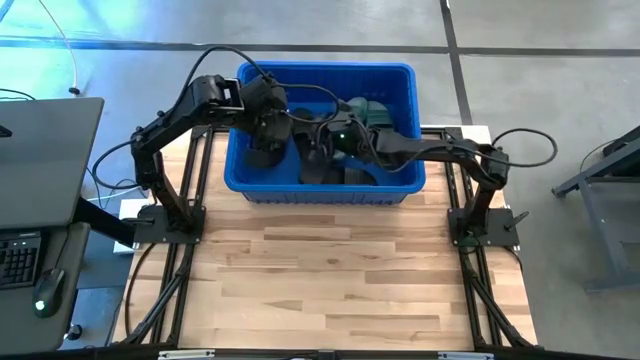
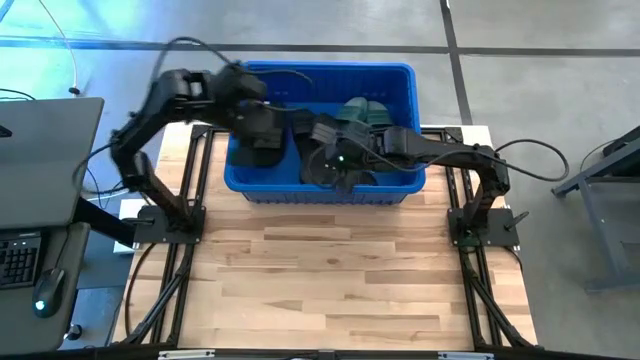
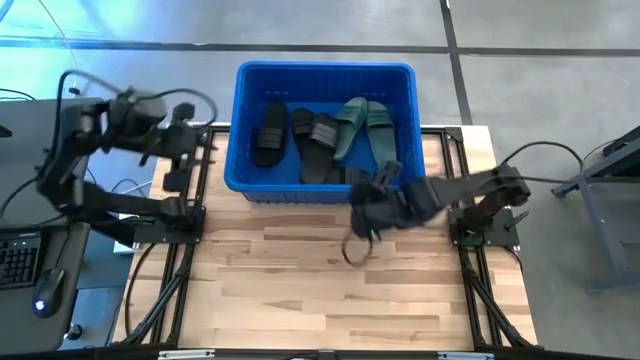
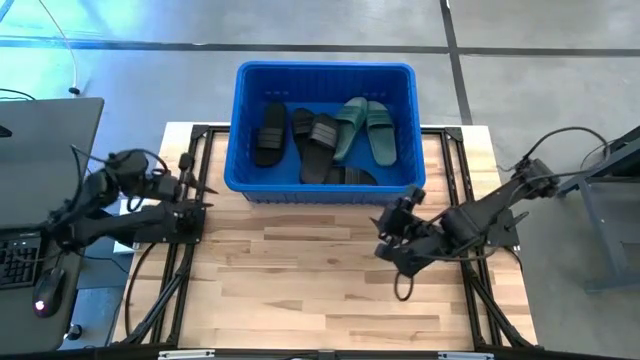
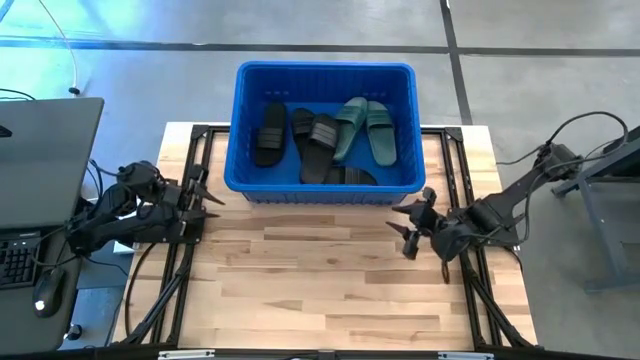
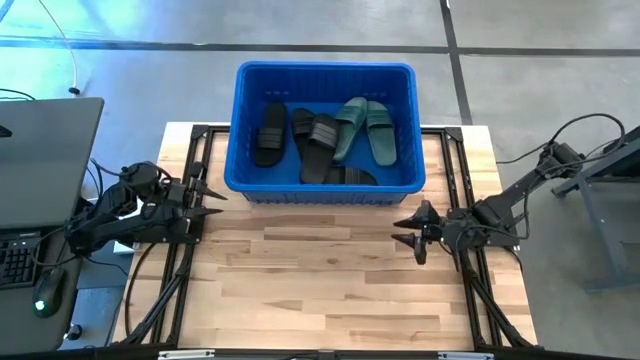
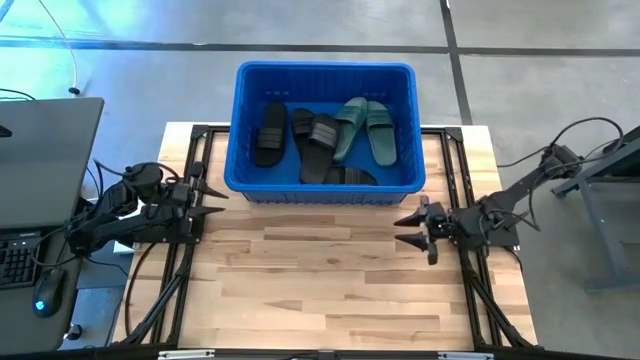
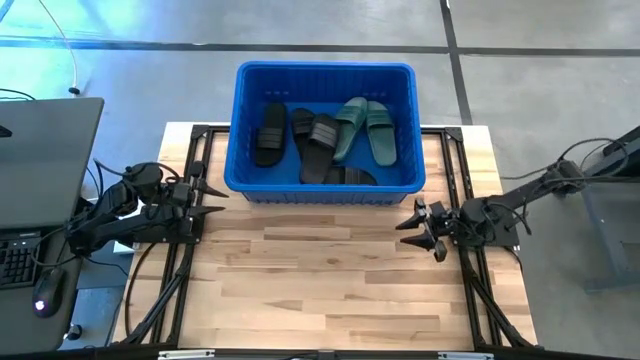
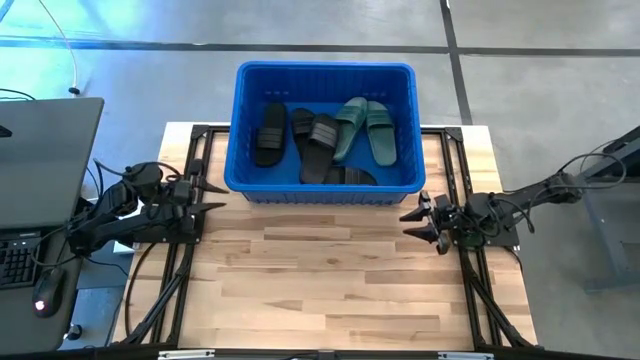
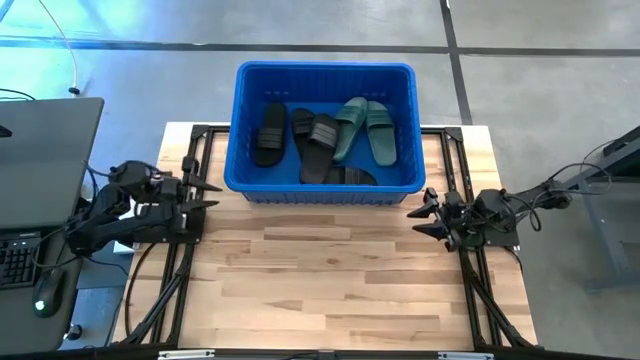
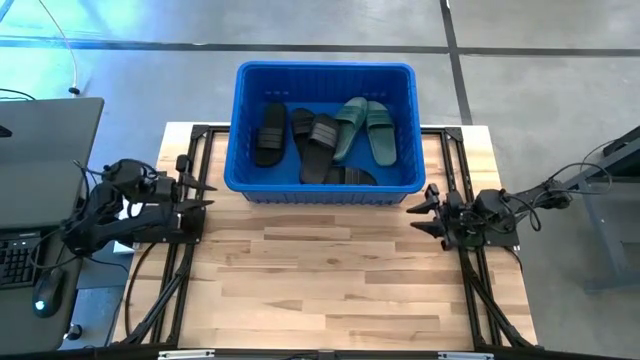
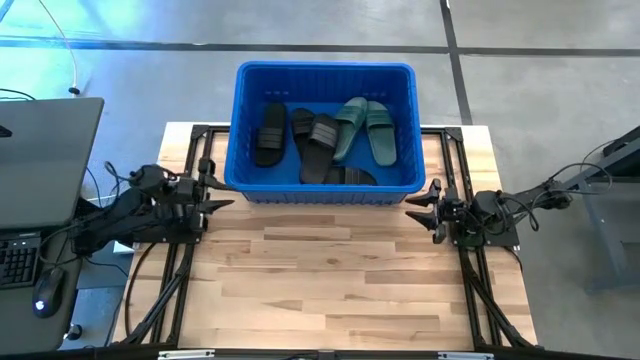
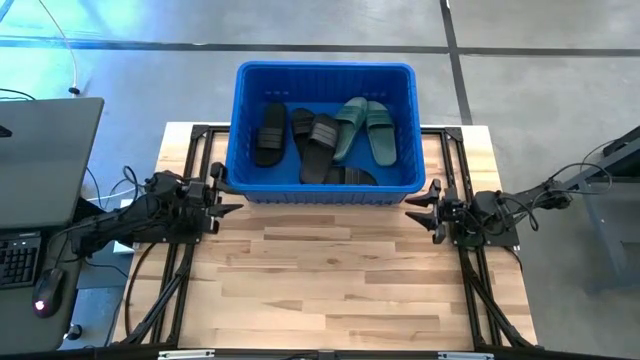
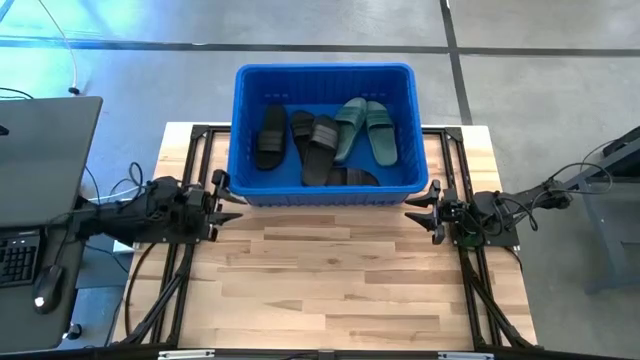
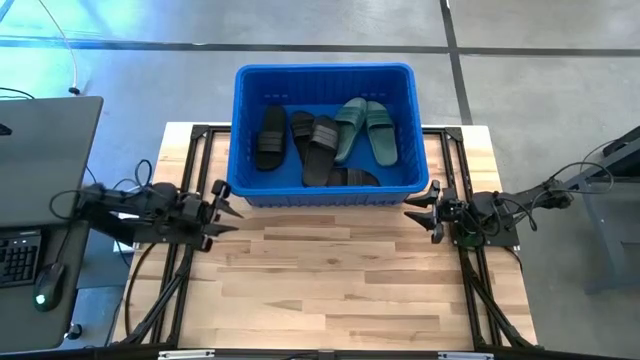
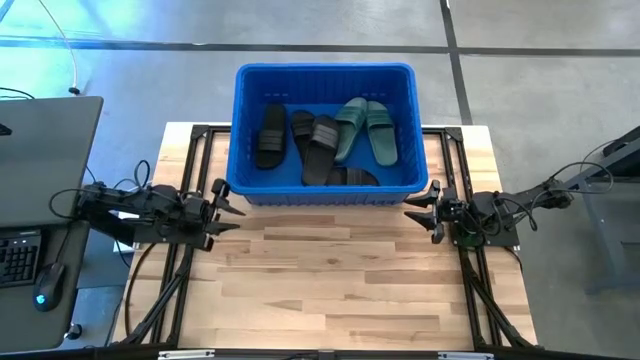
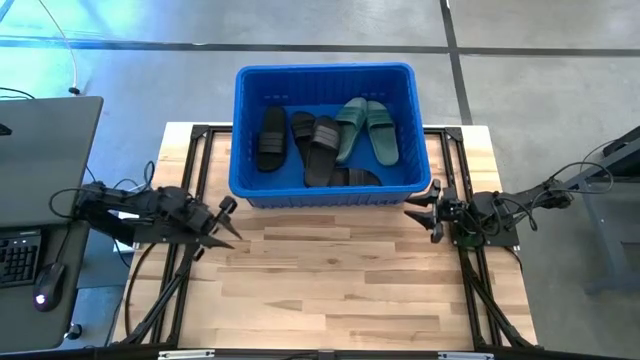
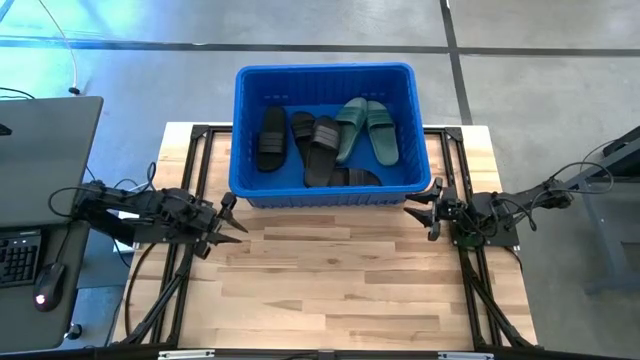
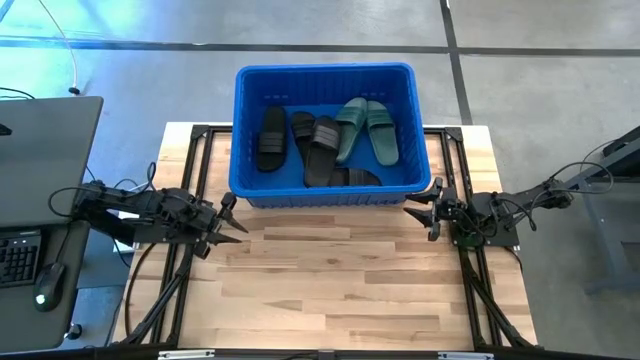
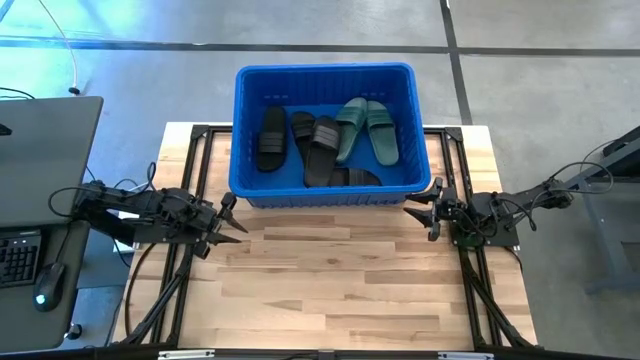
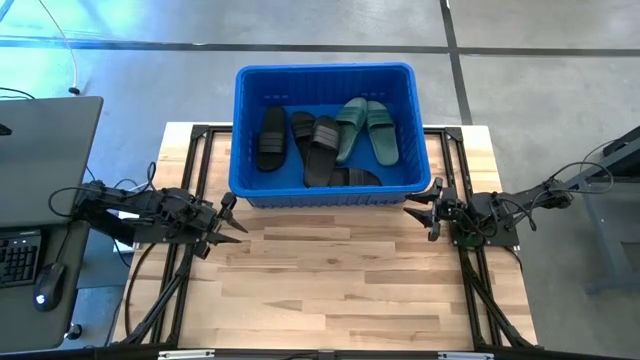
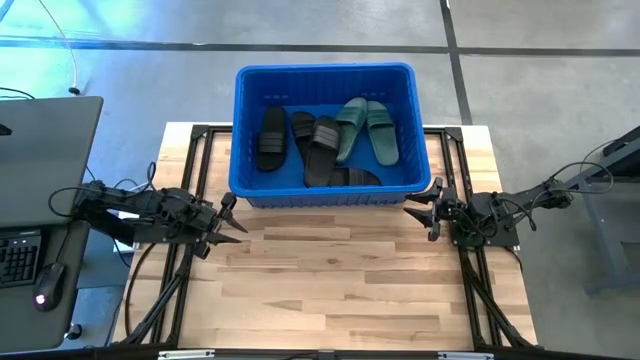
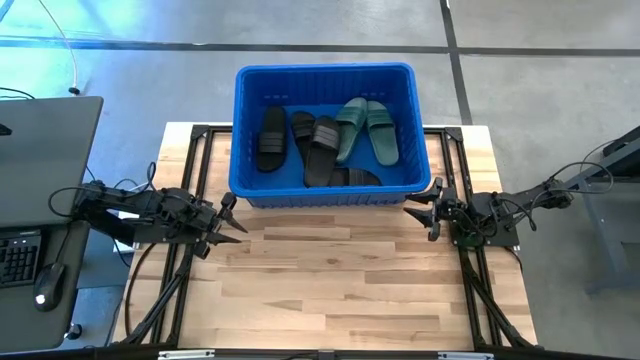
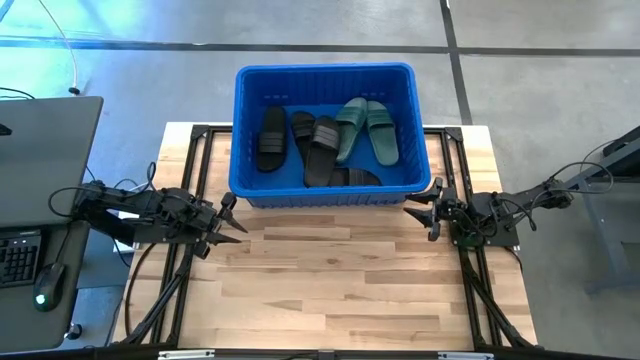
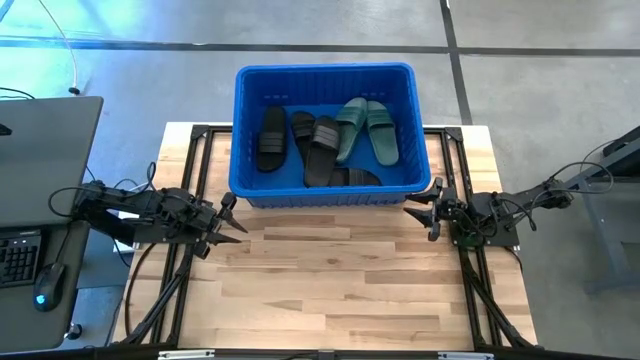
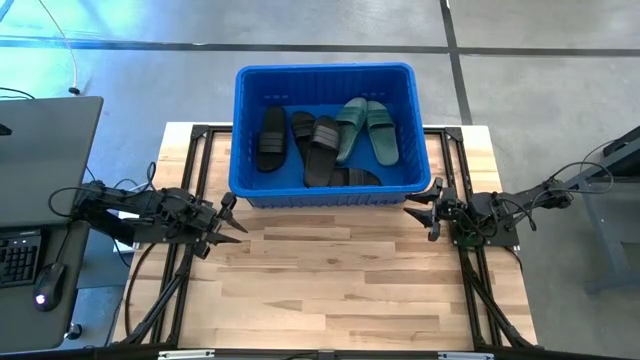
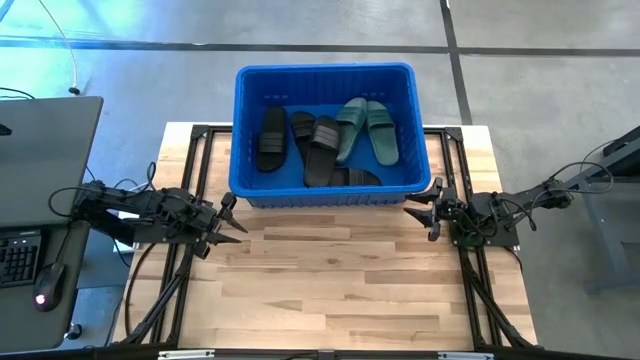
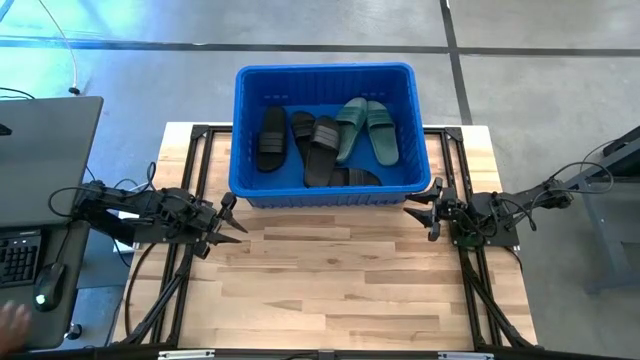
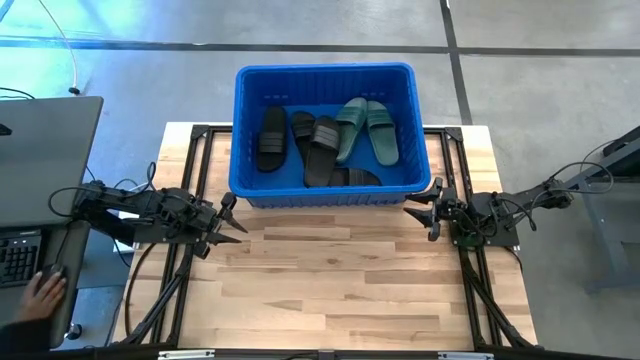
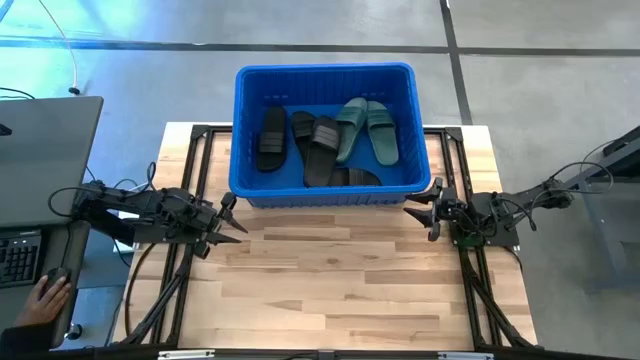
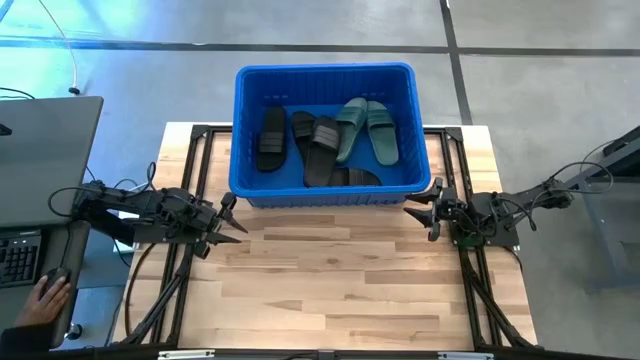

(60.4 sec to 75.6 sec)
Task: Pick and place slides into bin
Return to Home Position

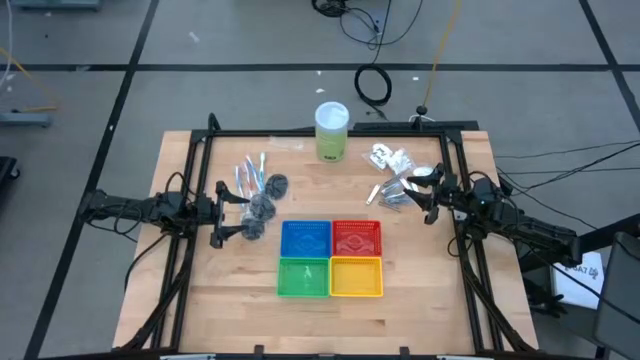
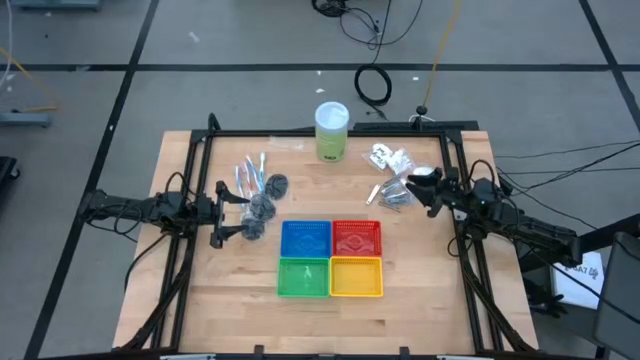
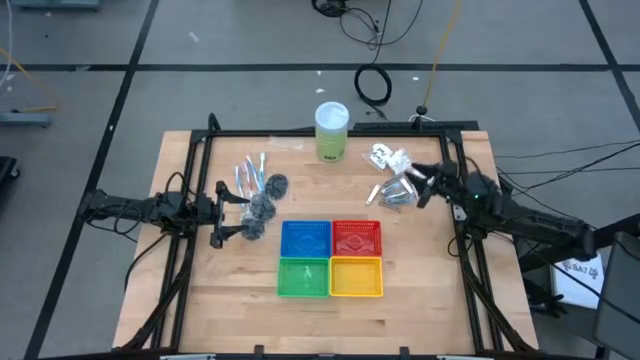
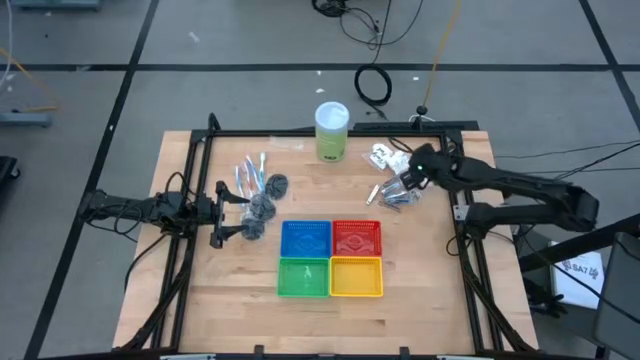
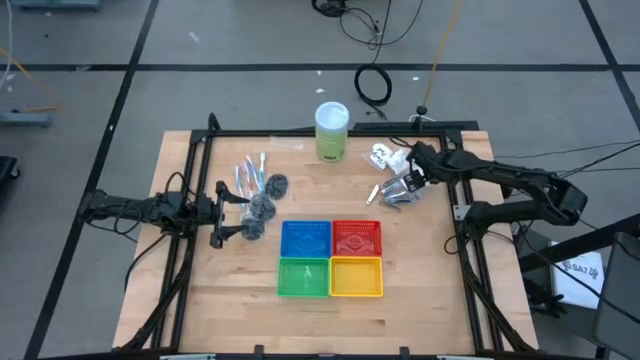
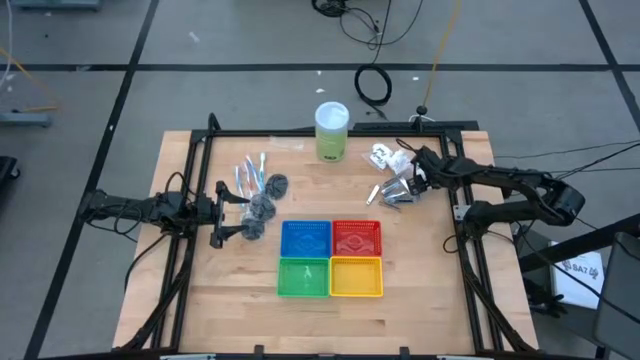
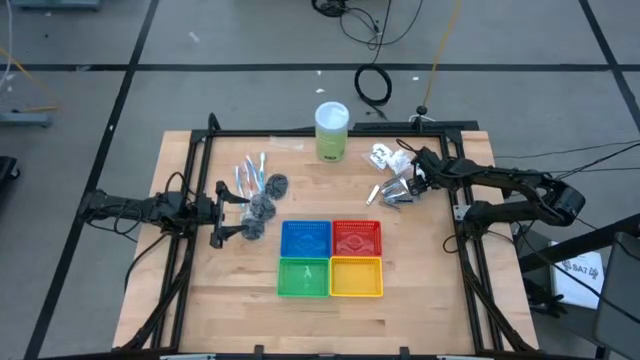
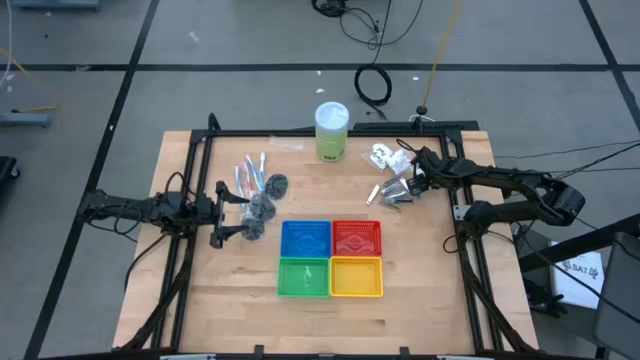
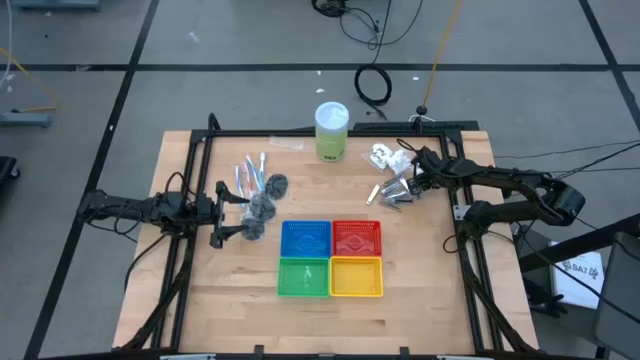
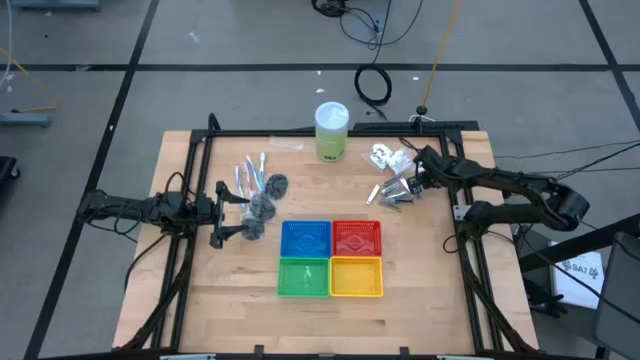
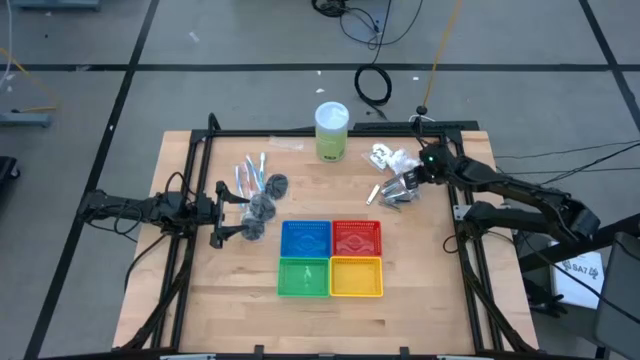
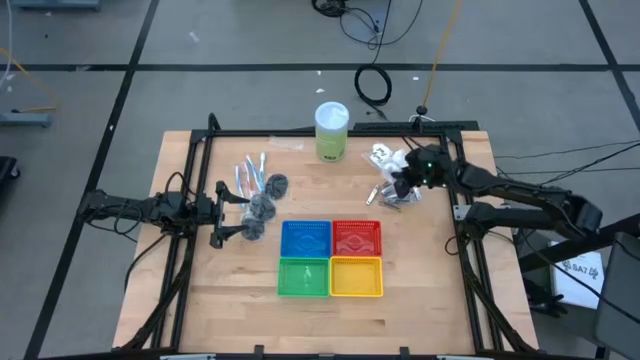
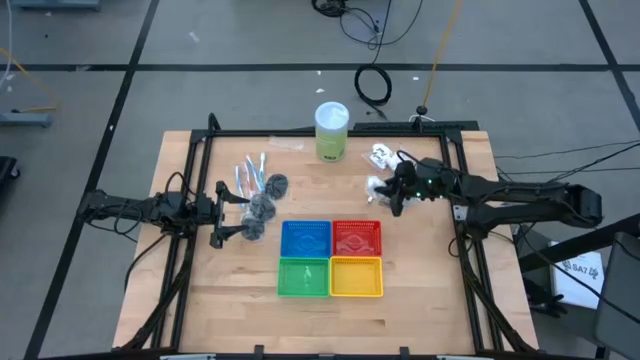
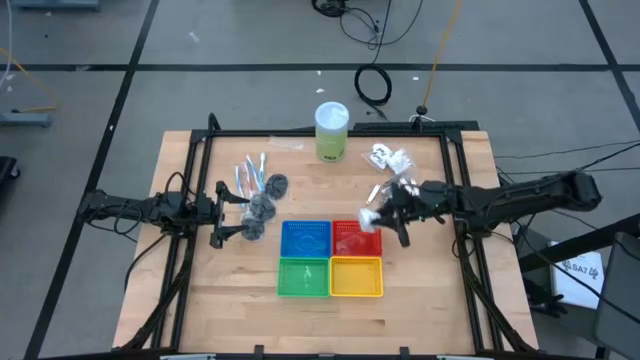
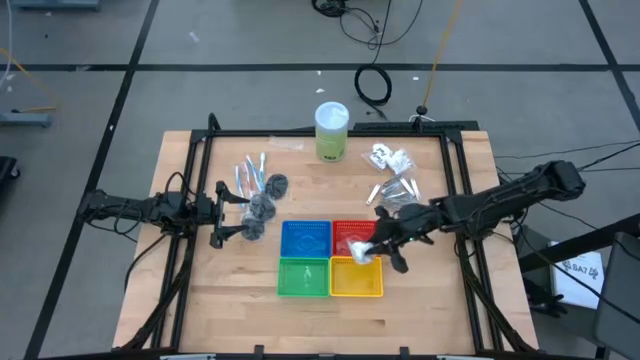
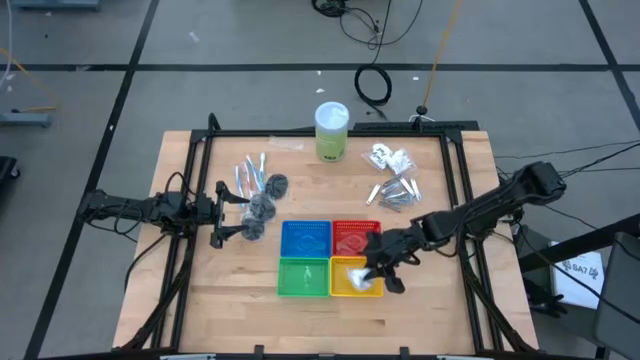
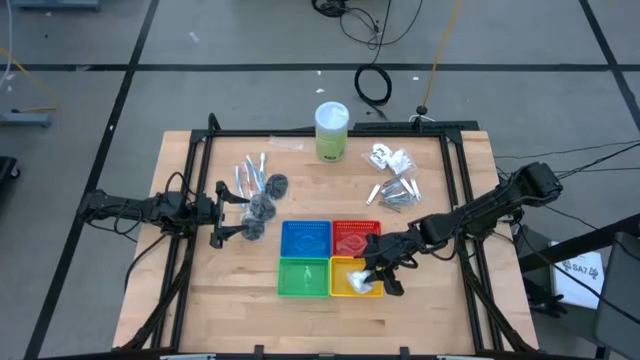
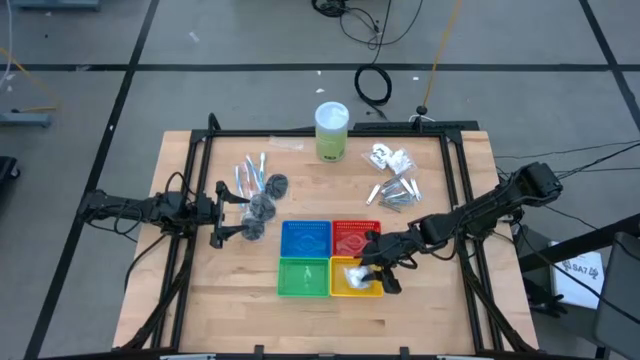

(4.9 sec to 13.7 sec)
Task: Pick & Place Travel size toiletries
Put the bottom right white cotton pack into the yellow basket
